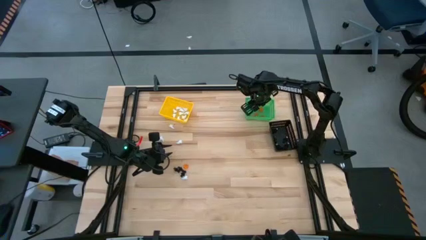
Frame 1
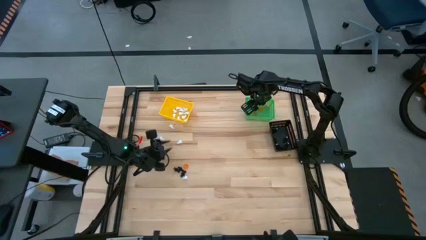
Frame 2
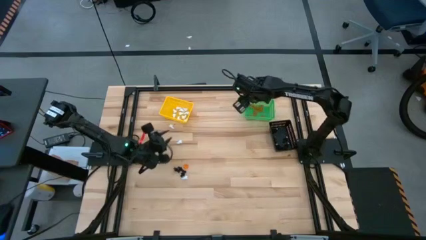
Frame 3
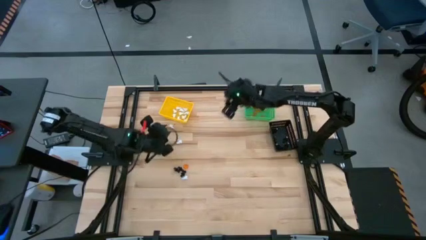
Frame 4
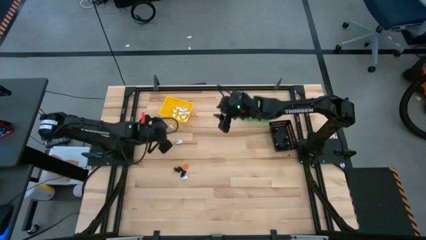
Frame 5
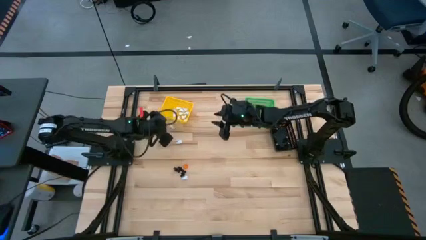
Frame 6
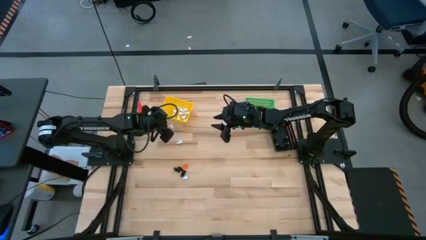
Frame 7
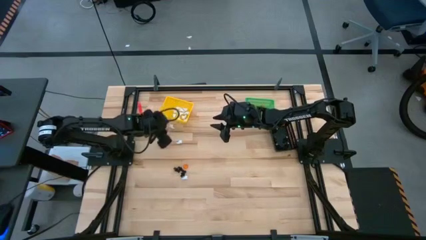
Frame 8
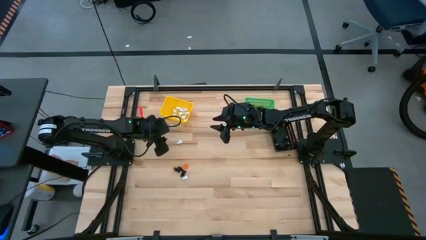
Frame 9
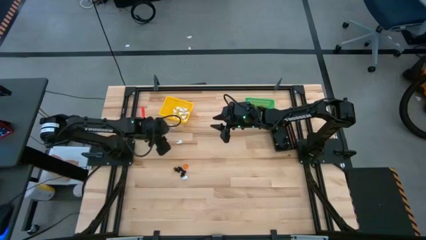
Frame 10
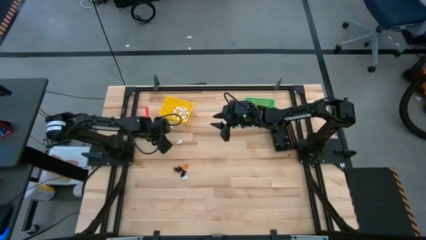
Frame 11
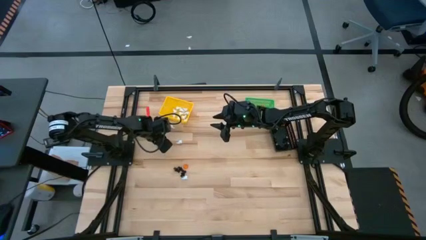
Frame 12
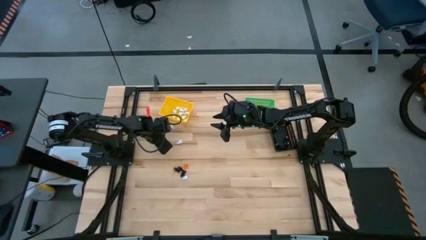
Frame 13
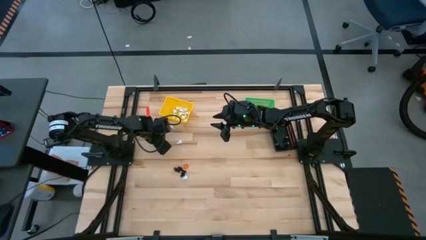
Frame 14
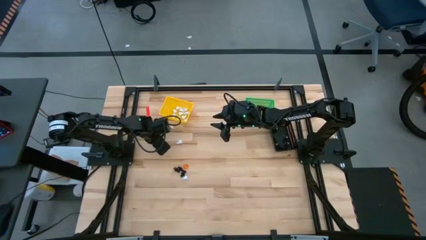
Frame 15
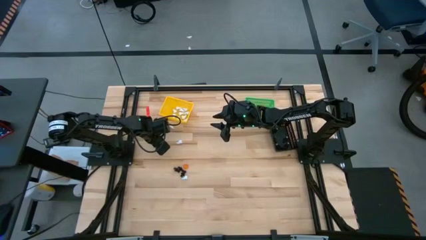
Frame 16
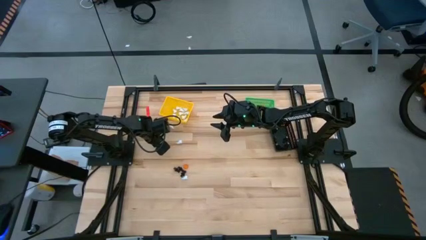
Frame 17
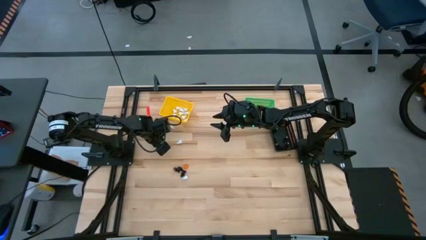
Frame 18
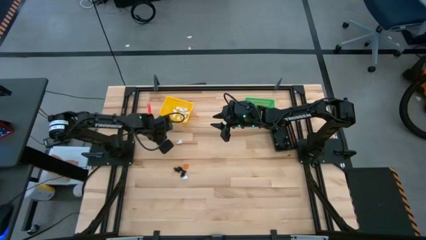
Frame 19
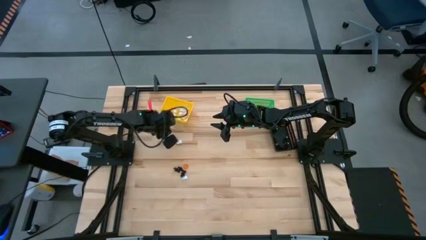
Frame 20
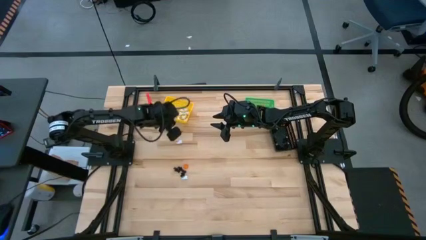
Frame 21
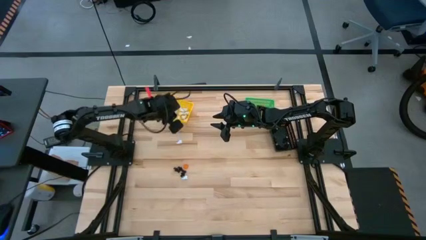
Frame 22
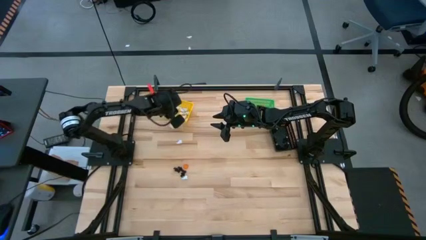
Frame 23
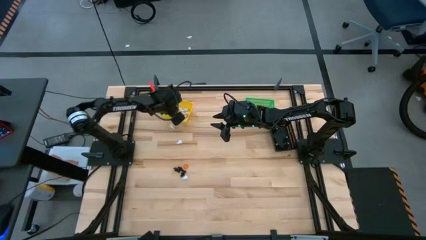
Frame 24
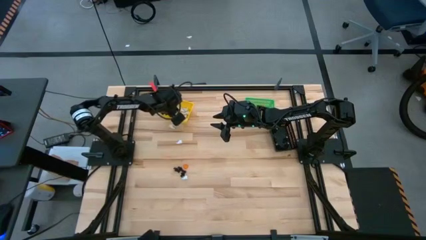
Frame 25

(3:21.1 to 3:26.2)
Task: Sort Halloween decoration
Put the white ghost toy into the yellow bin

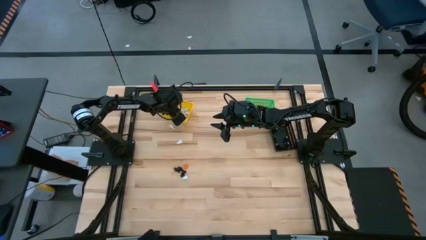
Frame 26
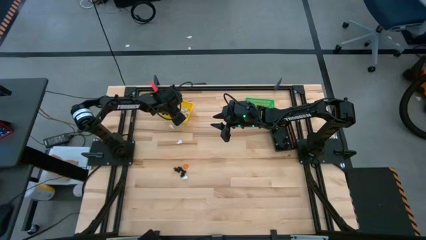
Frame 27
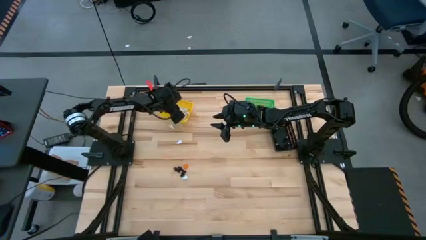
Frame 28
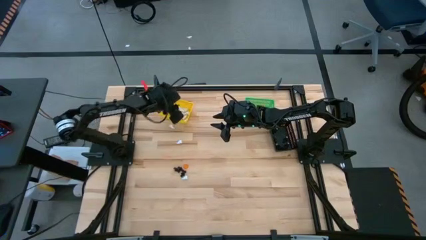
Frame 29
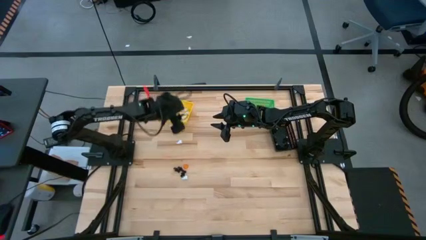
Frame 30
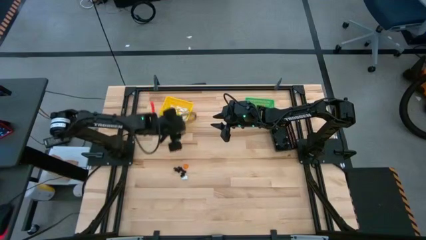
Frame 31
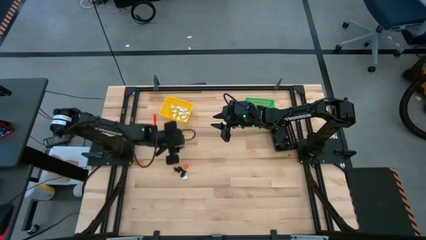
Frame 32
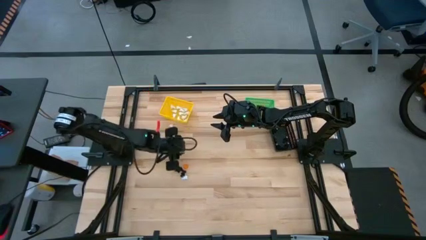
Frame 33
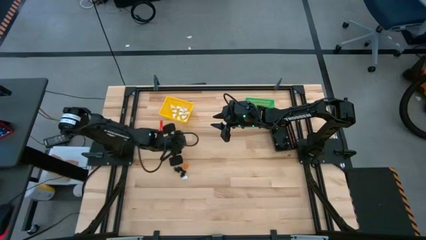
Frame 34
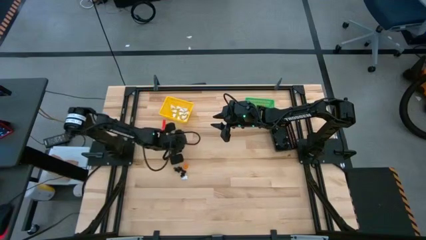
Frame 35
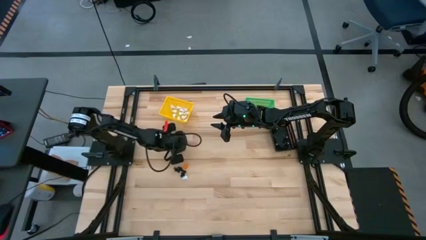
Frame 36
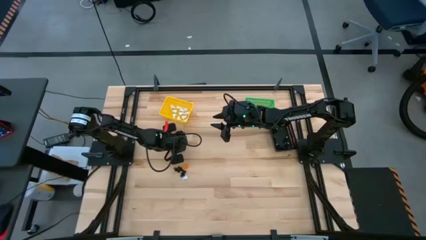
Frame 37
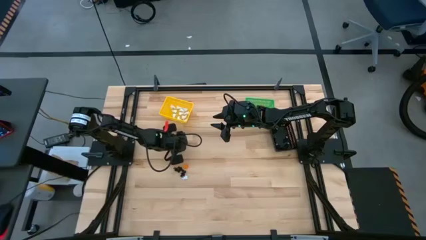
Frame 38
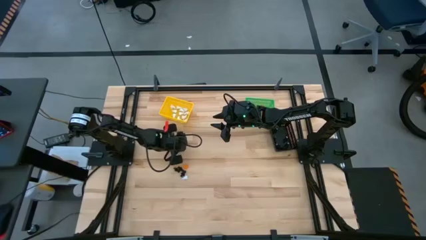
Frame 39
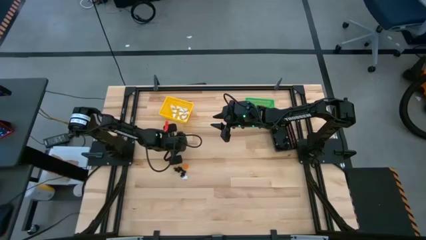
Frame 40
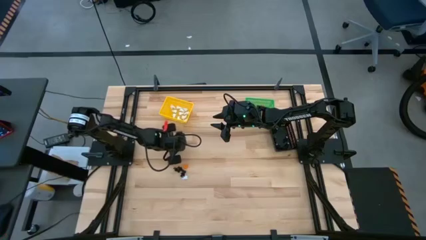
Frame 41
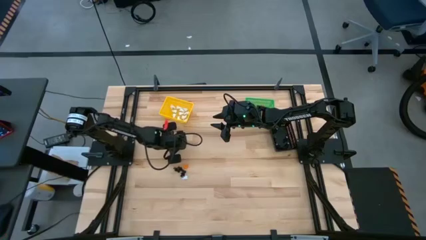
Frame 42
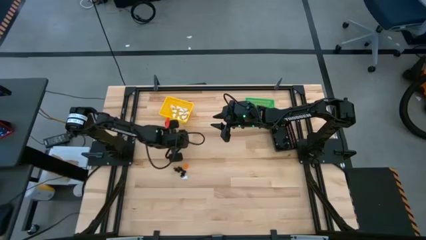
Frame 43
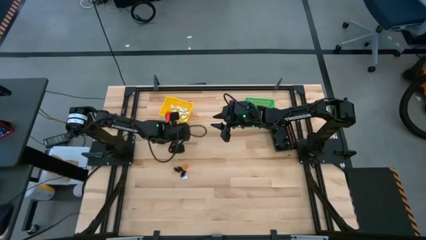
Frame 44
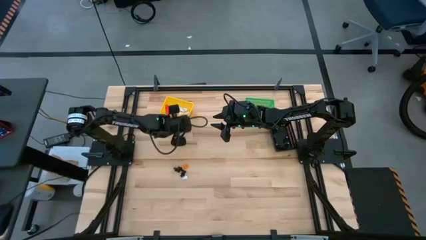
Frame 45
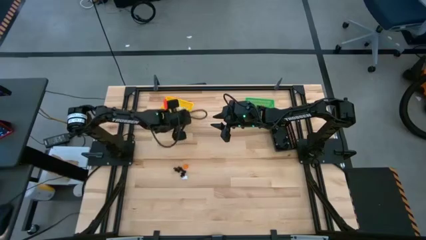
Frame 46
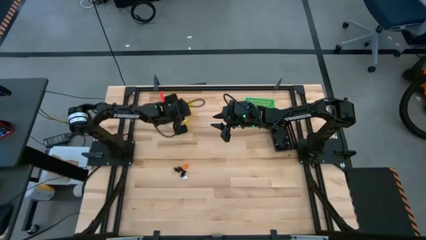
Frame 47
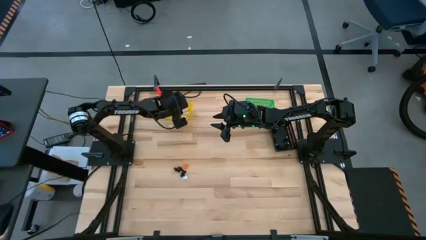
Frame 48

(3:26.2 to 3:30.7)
Put the white ghost toy into the yellow bin

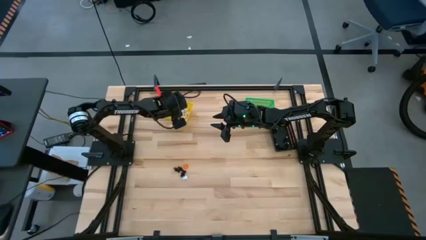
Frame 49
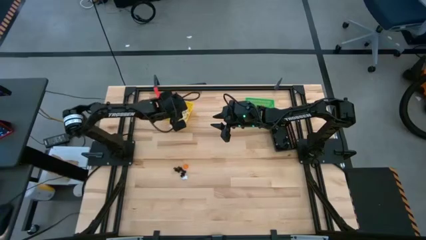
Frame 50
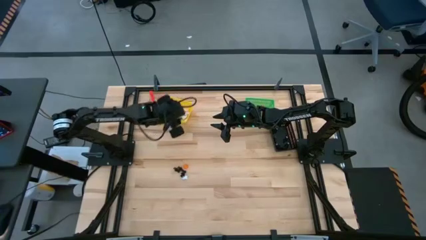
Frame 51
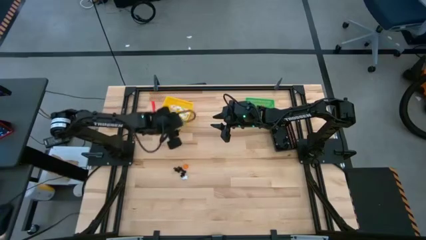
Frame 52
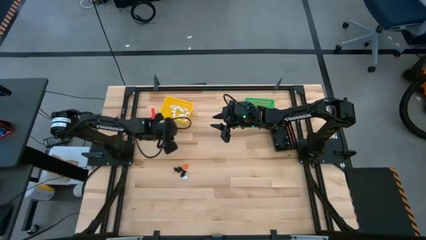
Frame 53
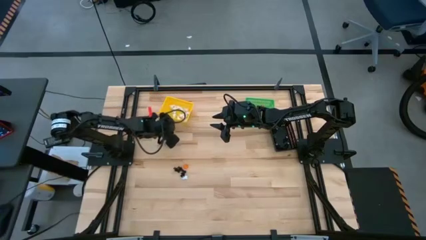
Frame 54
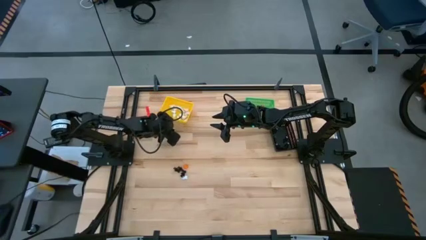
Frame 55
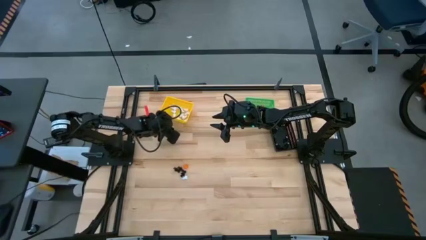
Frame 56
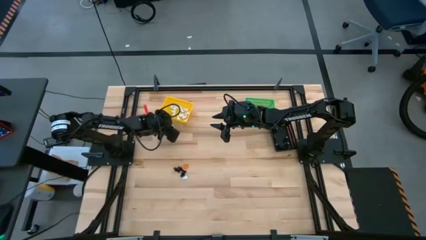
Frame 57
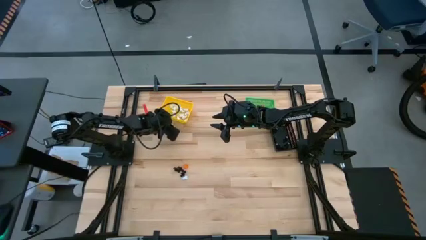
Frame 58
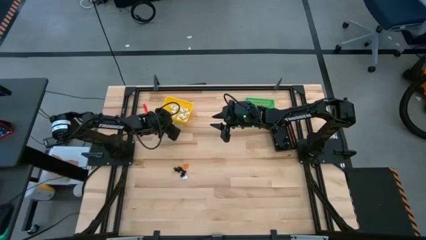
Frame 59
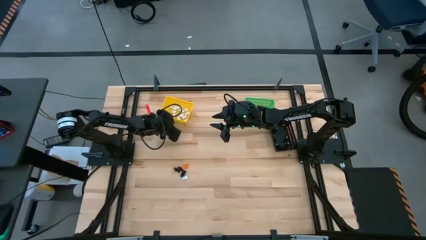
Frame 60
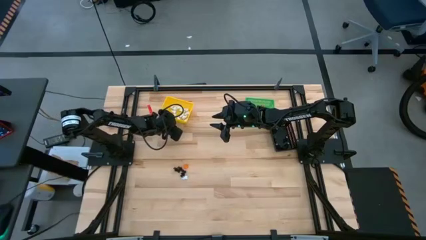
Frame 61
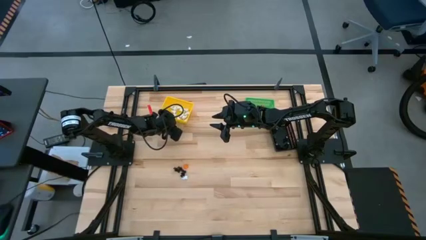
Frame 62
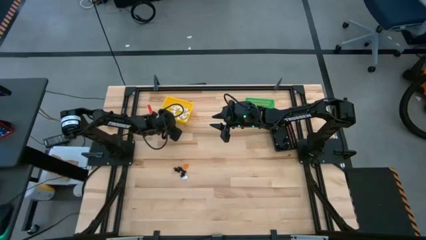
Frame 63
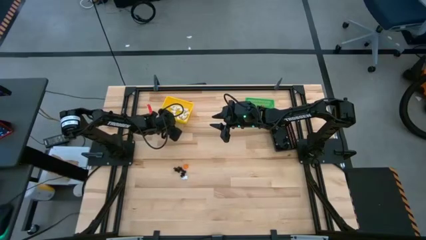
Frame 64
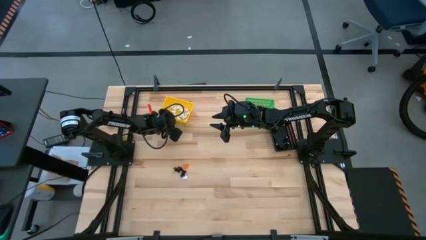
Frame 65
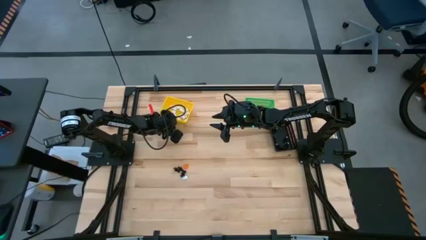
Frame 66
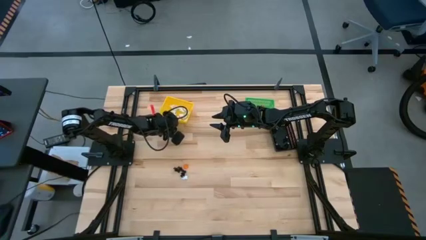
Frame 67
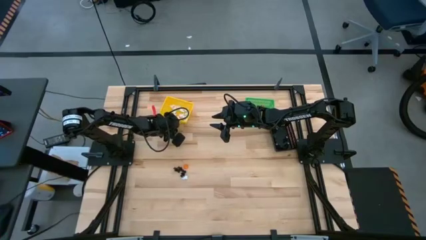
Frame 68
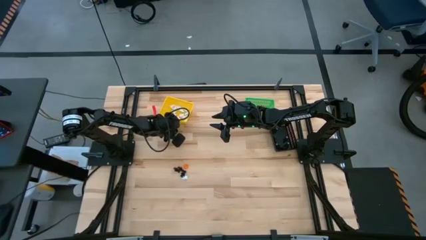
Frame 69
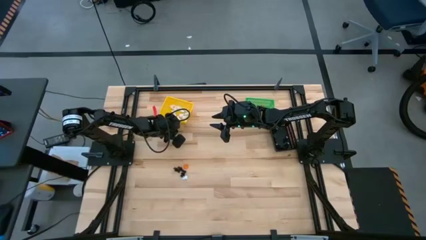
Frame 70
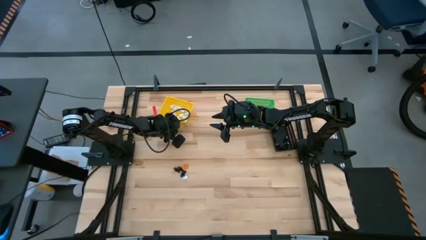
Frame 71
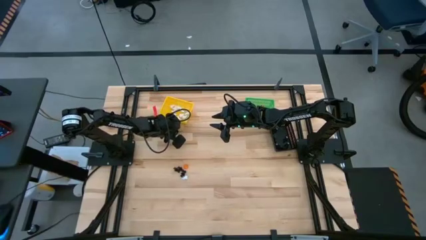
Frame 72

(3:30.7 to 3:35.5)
Put the white ghost toy into the yellow bin

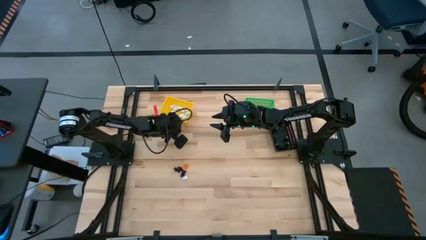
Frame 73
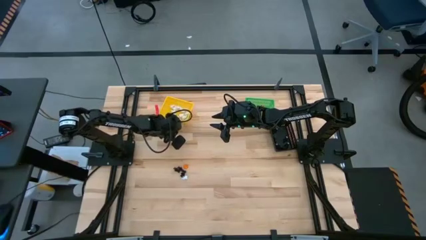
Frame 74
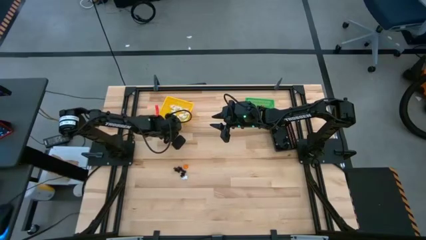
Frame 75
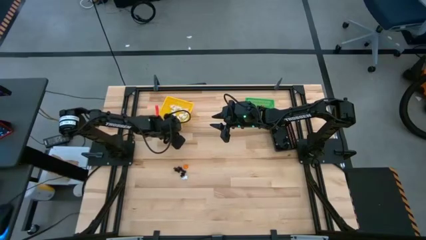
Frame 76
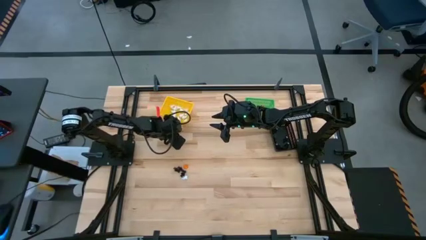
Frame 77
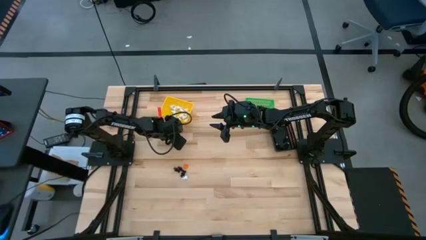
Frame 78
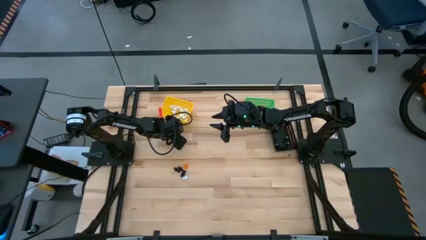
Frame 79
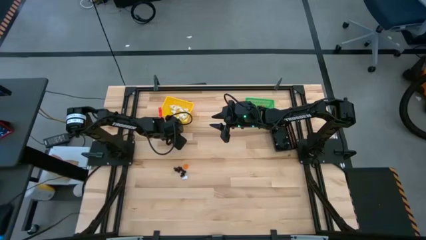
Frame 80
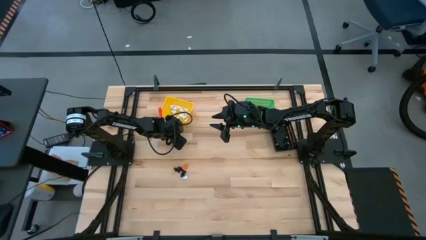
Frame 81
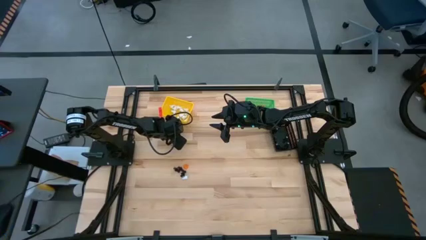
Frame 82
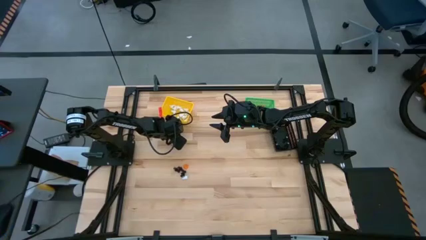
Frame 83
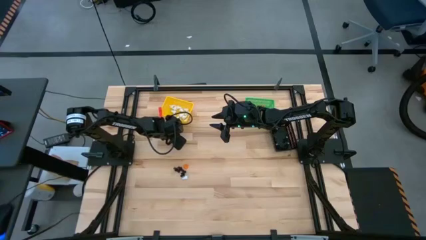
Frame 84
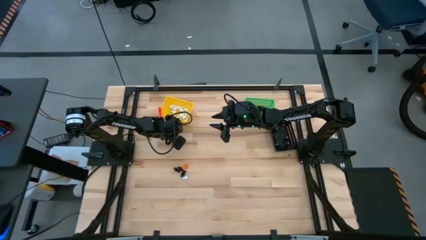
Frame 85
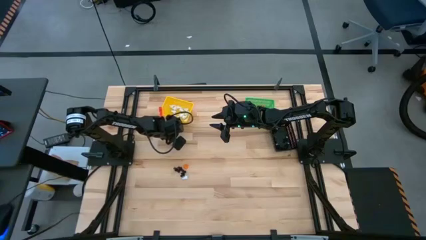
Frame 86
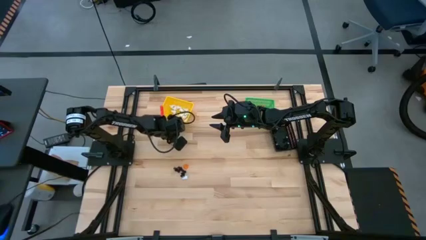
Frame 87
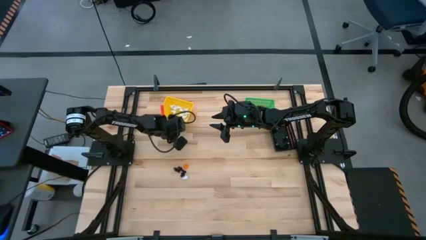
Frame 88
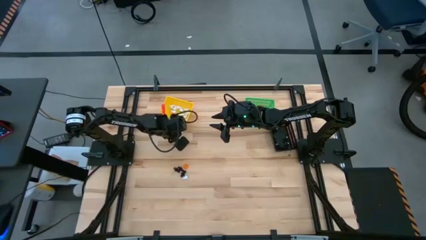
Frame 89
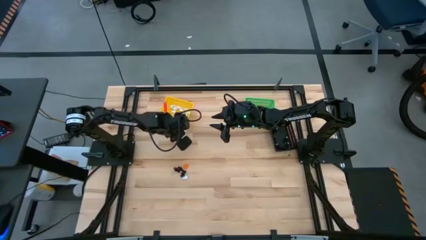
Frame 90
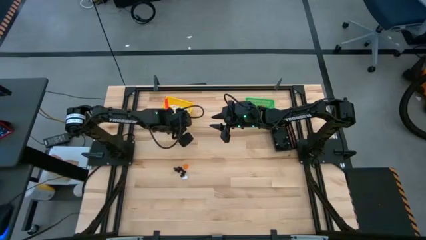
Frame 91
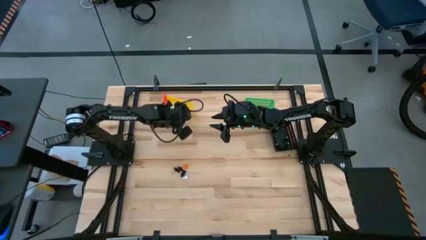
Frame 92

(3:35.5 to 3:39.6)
Put the white ghost toy into the yellow bin
